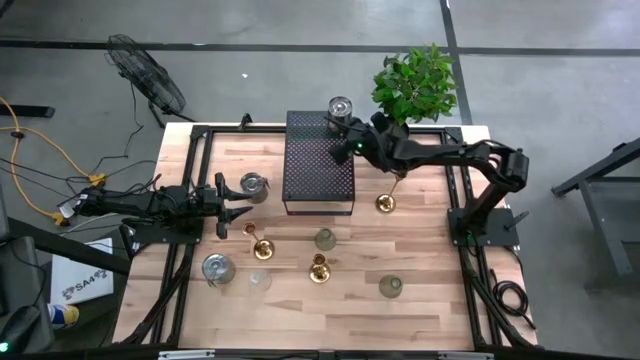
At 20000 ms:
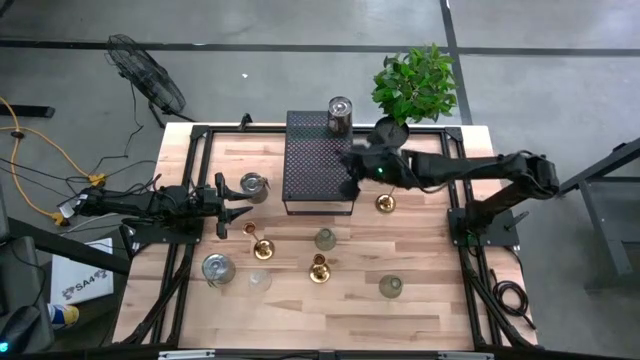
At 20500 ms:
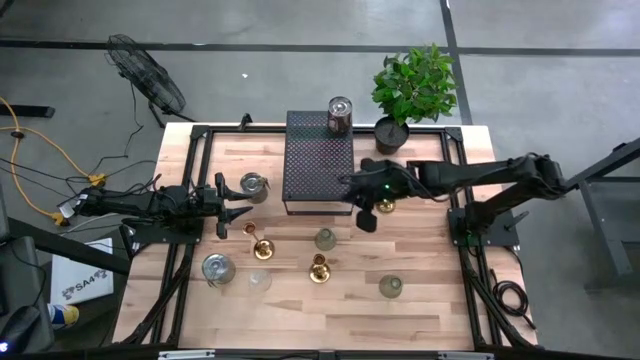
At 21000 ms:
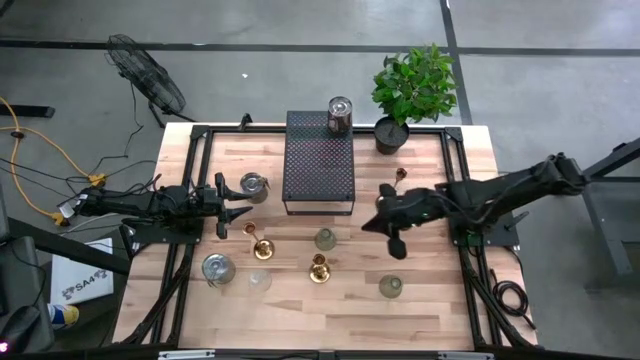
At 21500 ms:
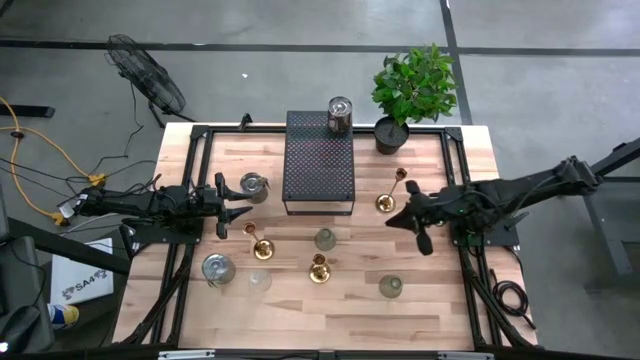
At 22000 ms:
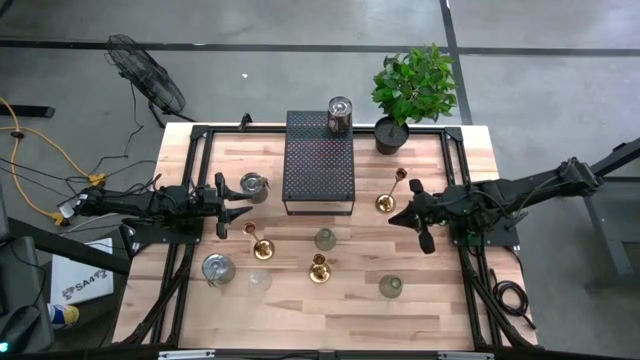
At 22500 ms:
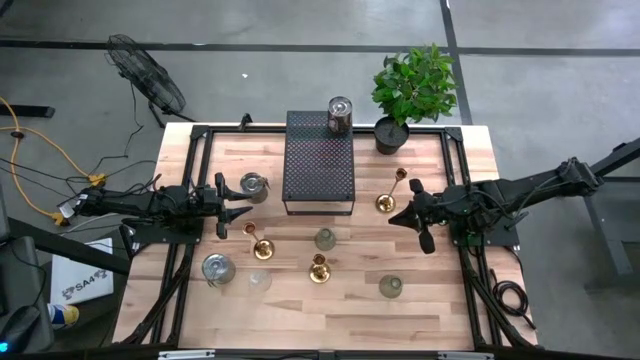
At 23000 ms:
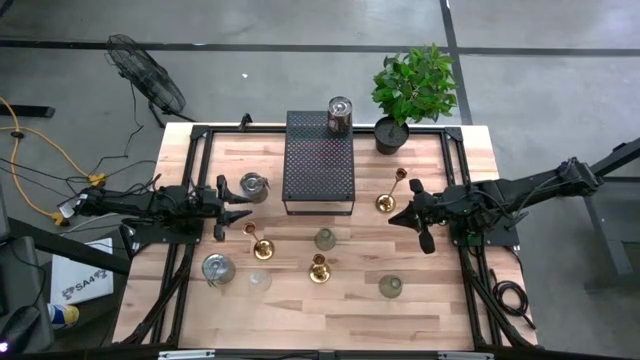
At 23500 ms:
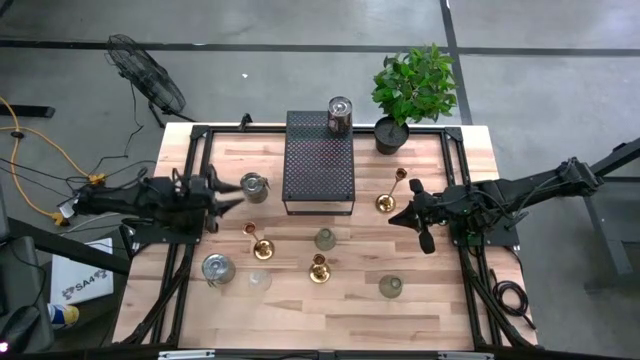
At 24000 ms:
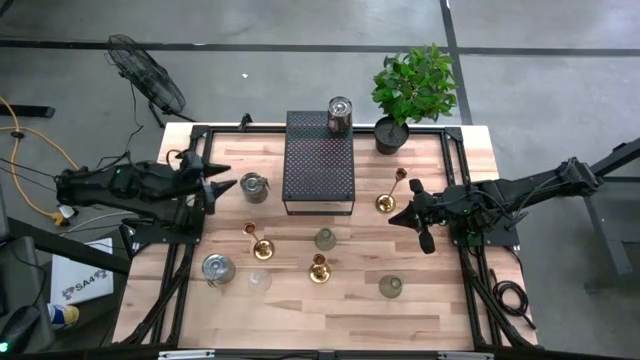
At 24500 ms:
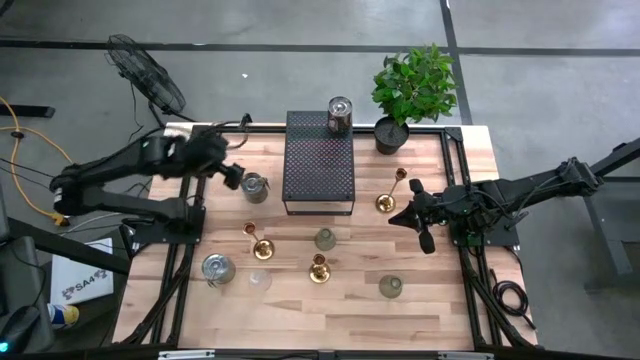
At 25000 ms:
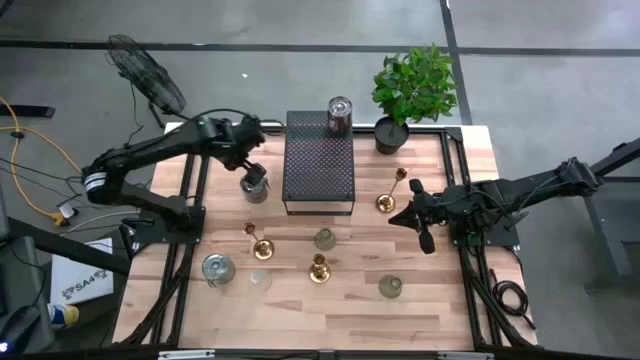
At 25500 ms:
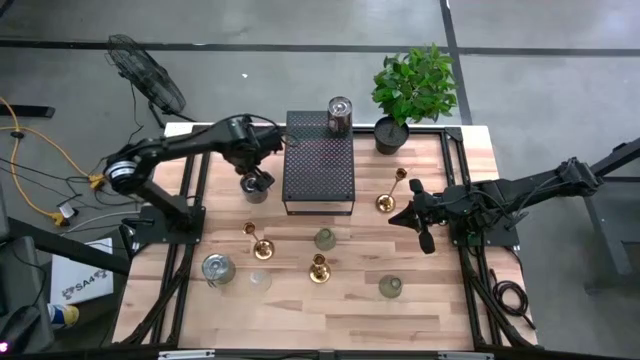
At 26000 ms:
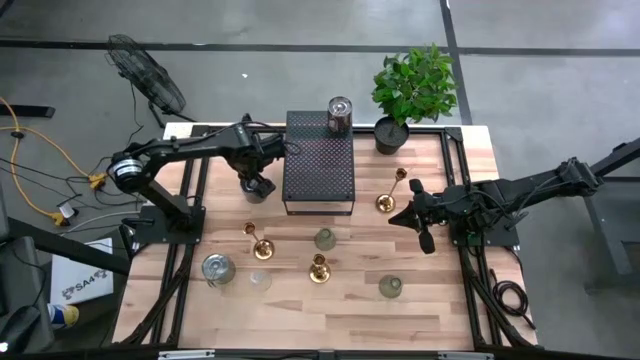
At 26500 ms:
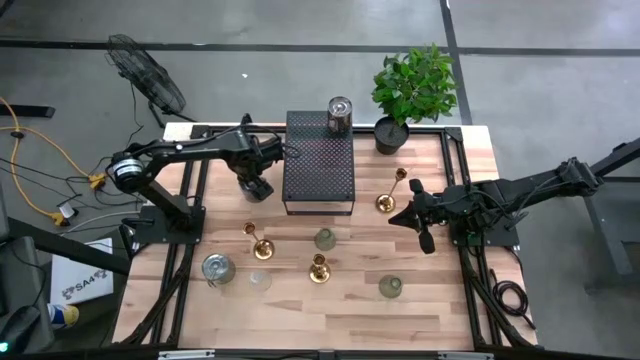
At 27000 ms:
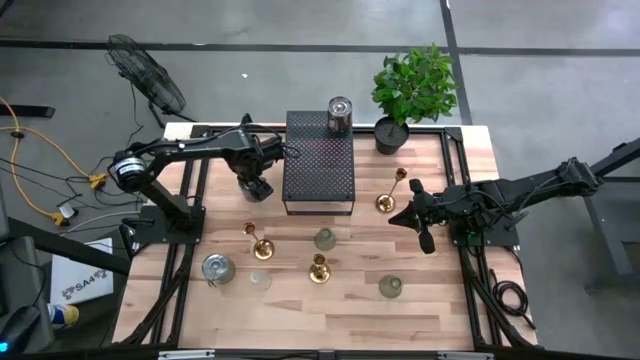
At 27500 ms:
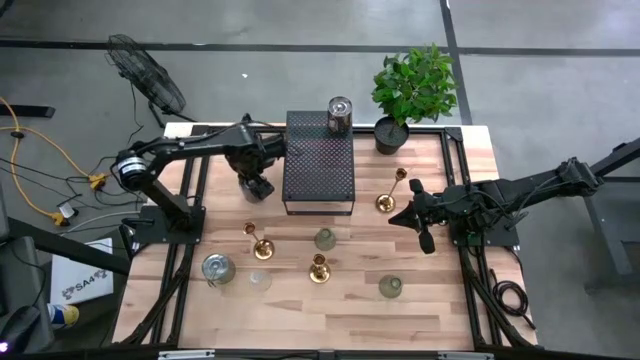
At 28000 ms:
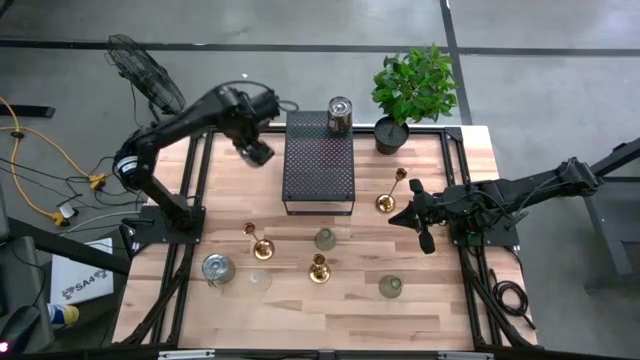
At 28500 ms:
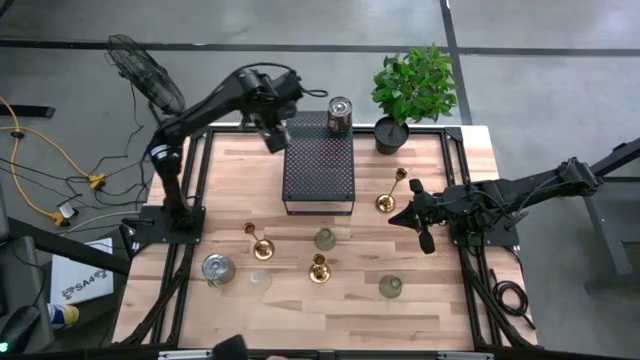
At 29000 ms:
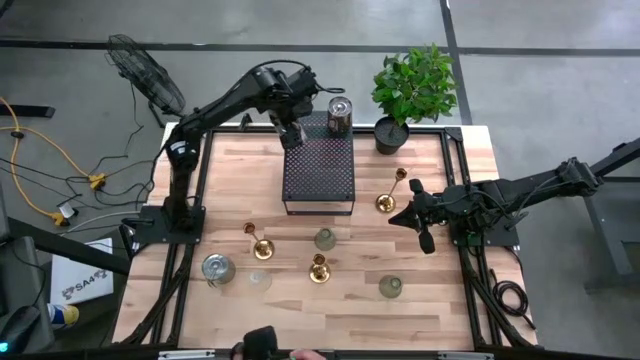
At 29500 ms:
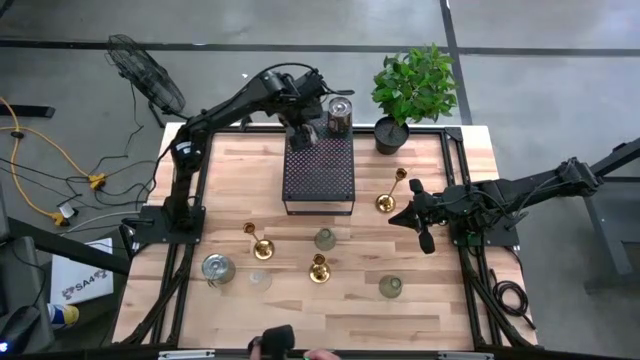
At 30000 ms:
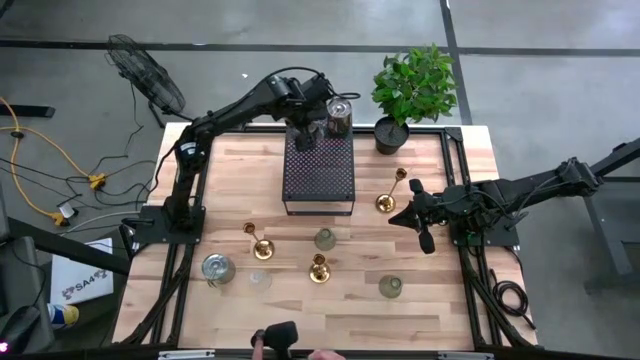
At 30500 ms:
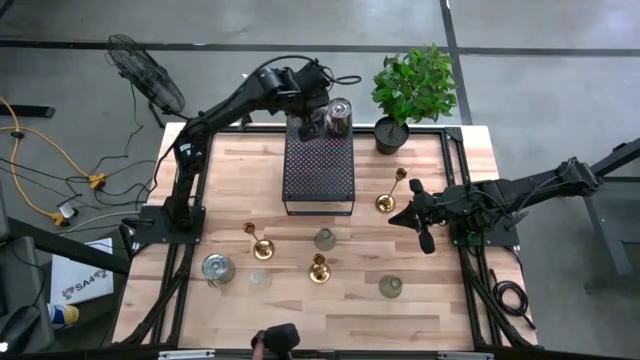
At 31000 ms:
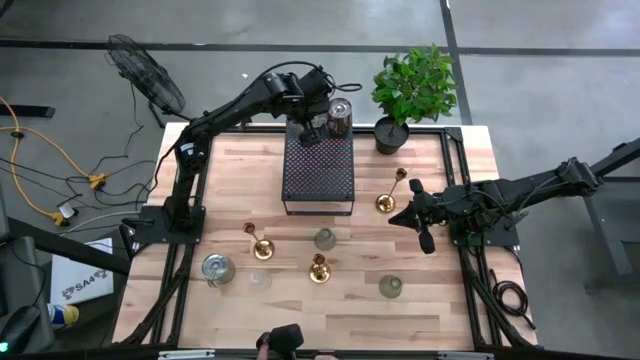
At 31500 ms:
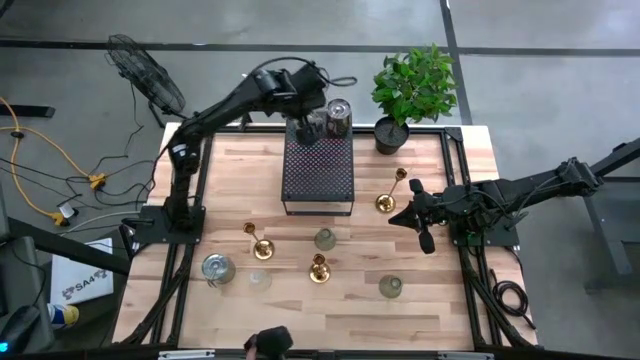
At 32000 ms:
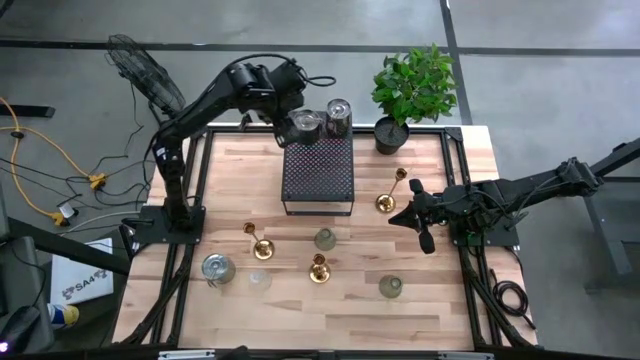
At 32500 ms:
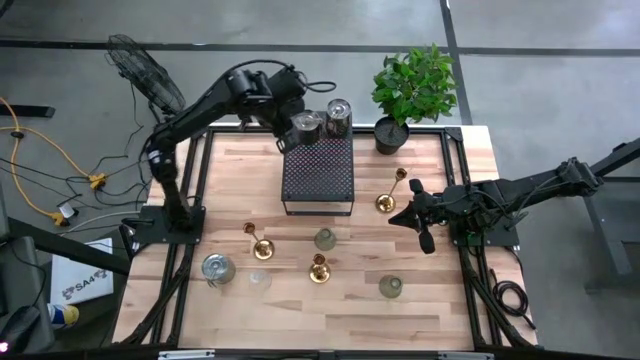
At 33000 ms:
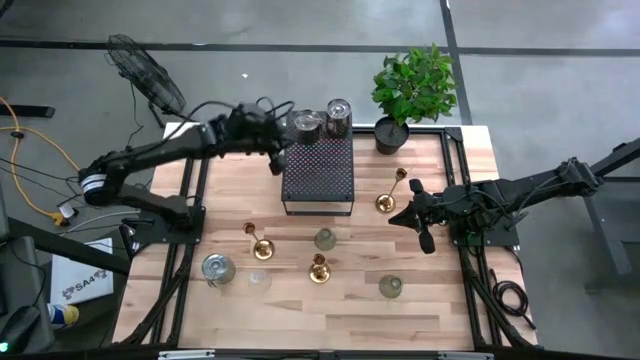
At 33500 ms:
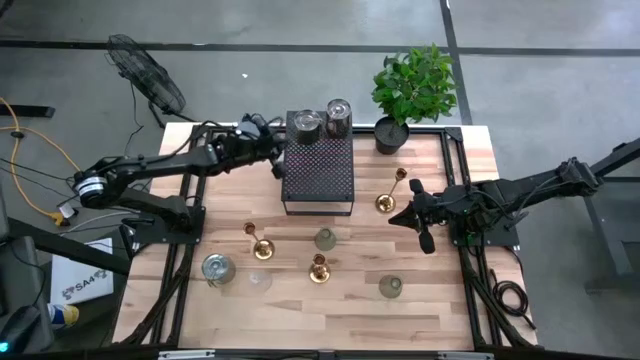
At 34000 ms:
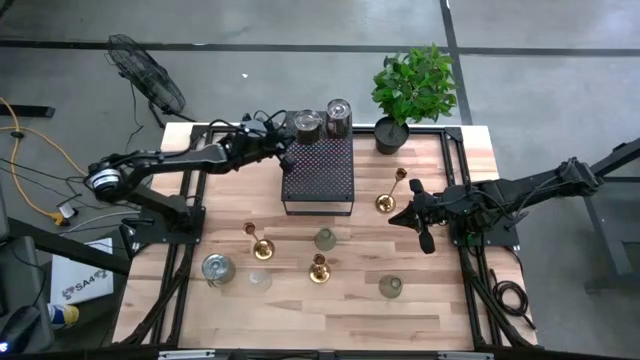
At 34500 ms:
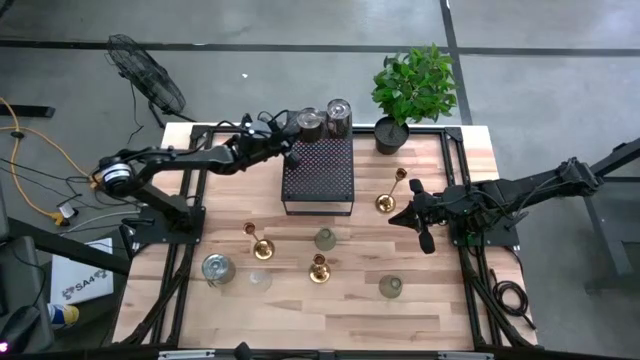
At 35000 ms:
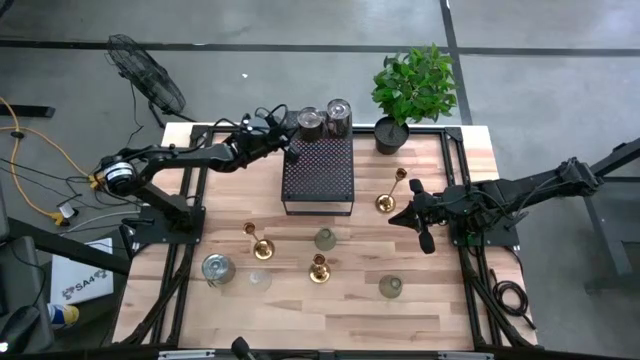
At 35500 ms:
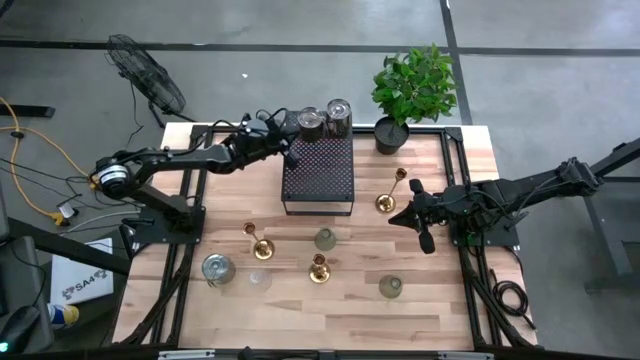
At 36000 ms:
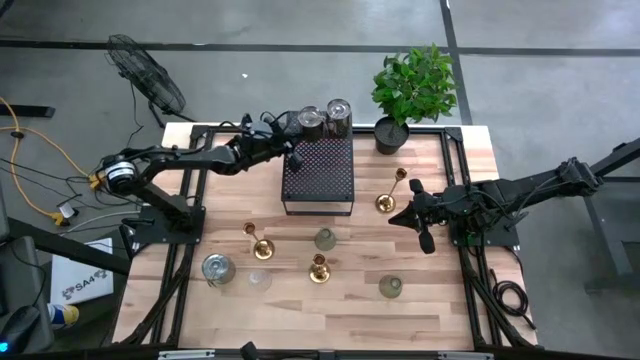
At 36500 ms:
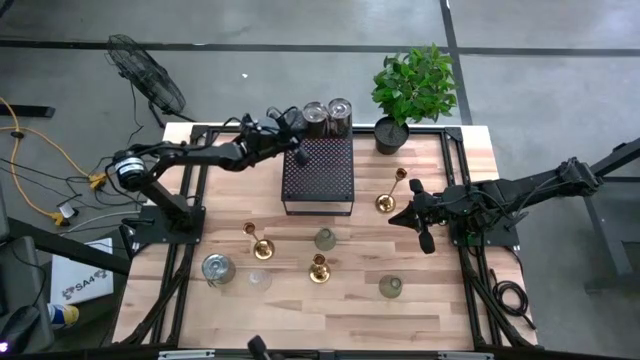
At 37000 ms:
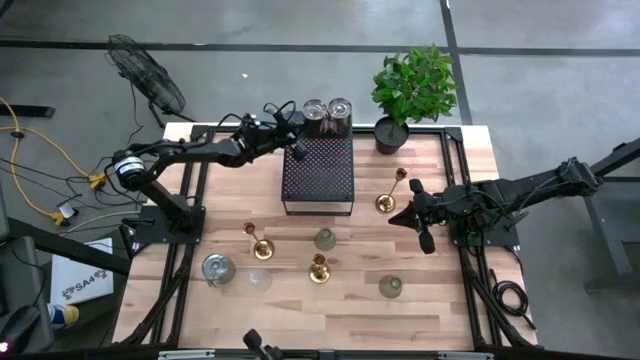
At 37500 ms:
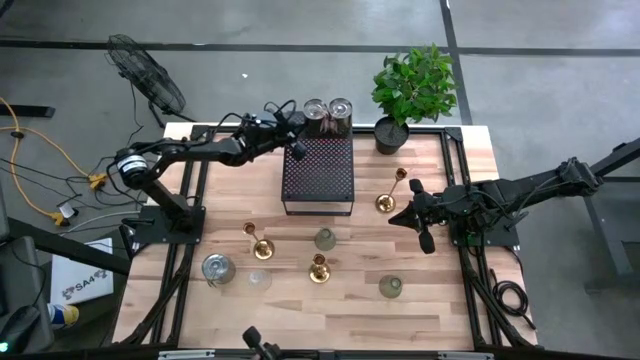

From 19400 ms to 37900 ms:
Task: Pick & Place candle stick holders
Put the top silver scented candle on the shelf

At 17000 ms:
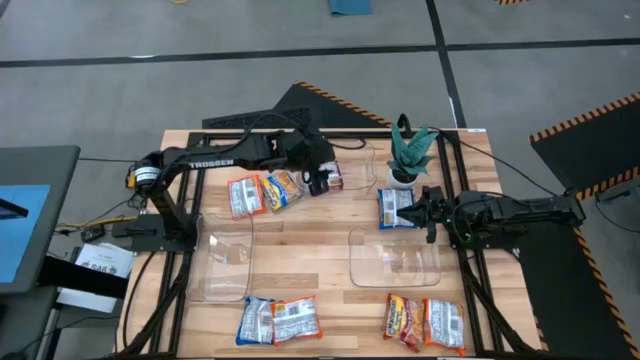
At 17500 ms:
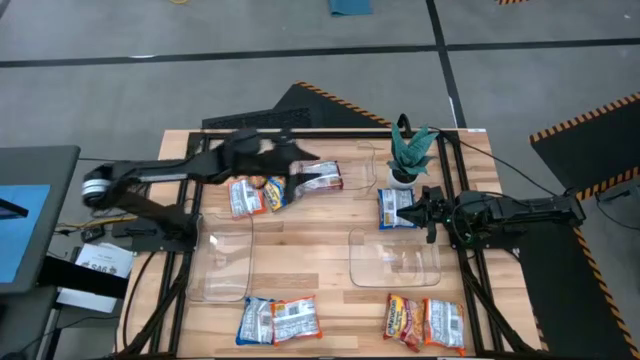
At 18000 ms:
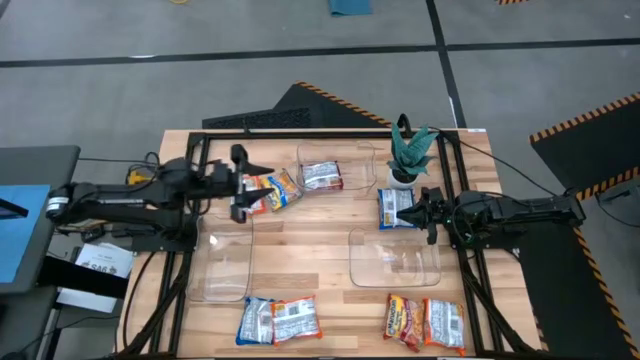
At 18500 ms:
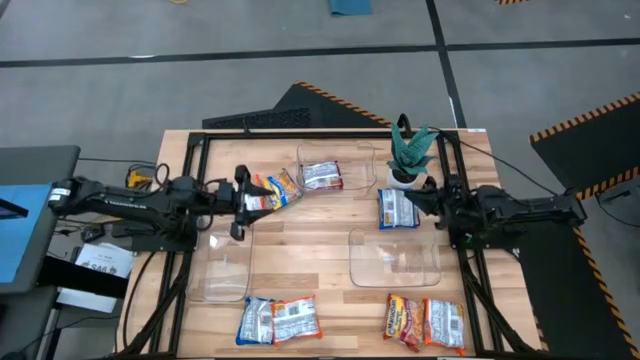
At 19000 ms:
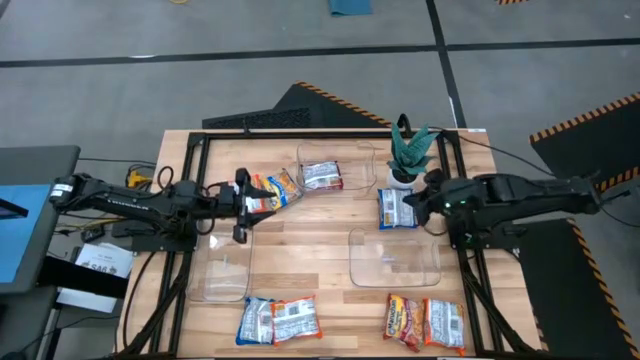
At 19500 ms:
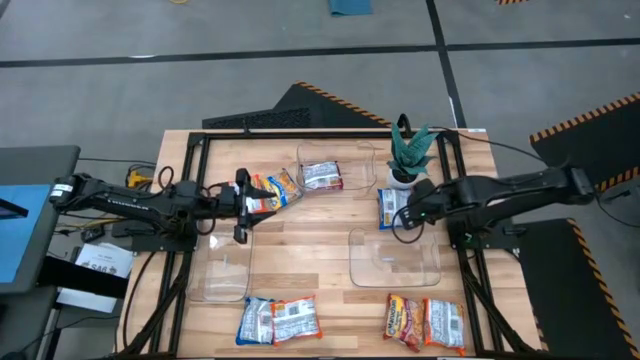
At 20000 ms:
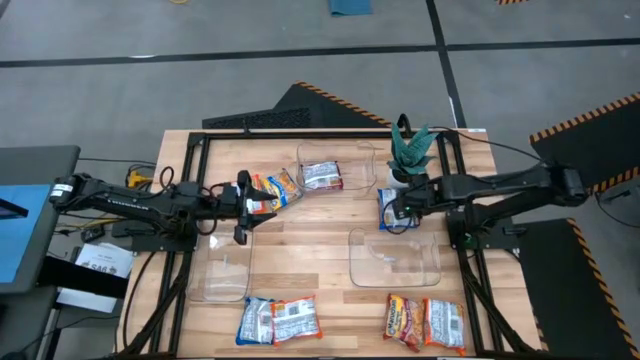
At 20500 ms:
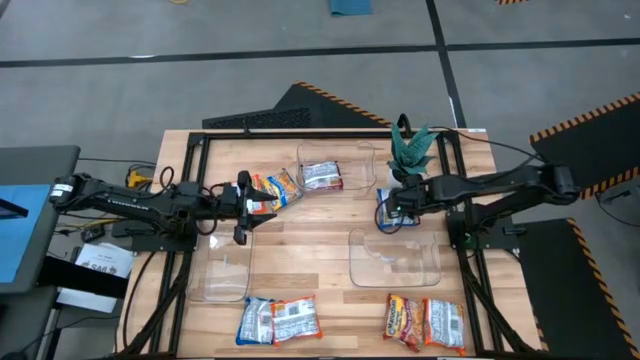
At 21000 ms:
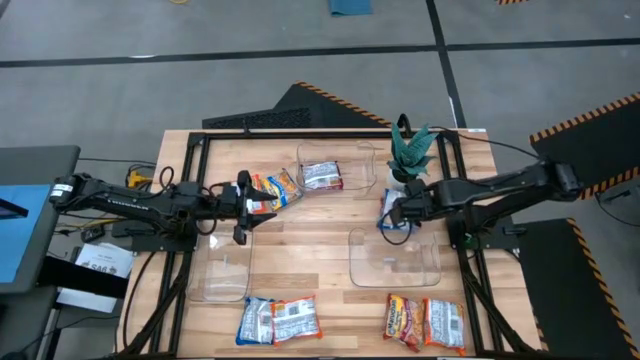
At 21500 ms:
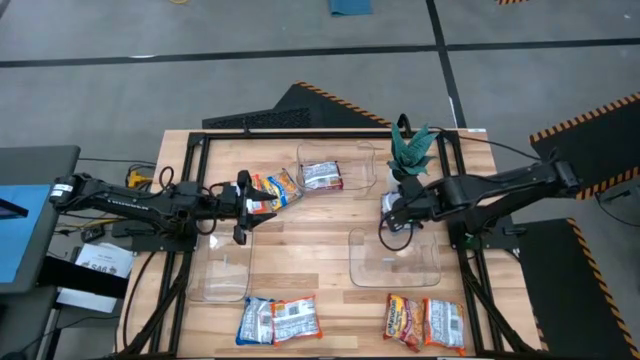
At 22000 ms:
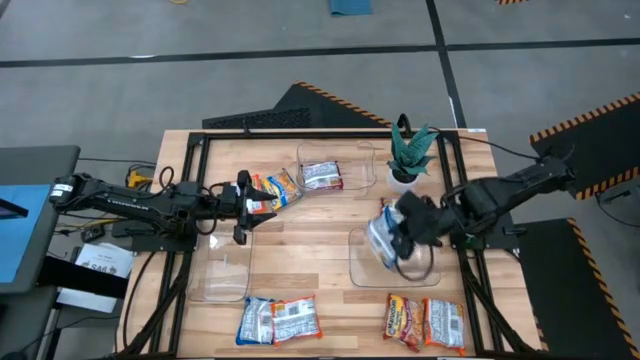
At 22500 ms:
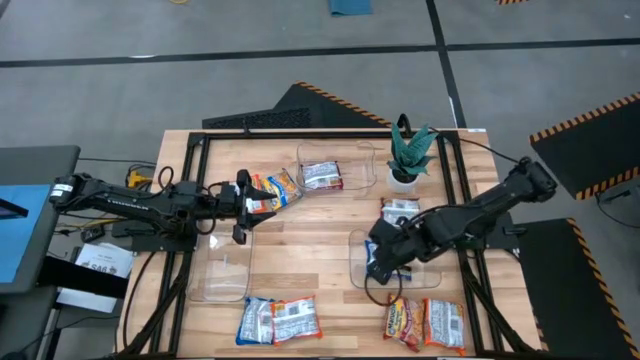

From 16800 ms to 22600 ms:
Task: Sort Maruchan noodles
Put the top right blue bag into the bottom right transparent bin
